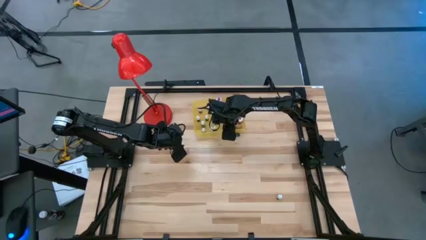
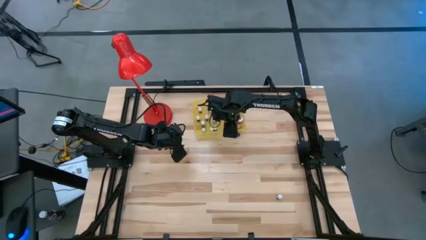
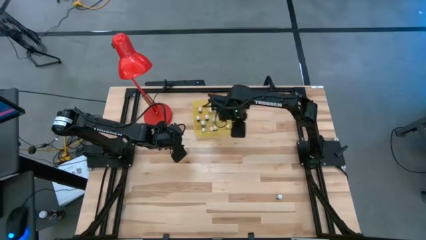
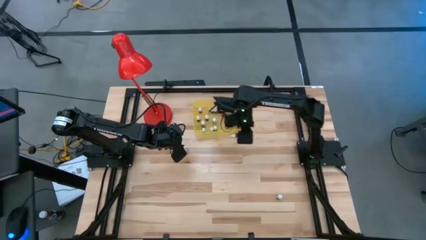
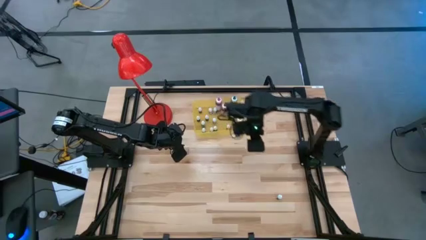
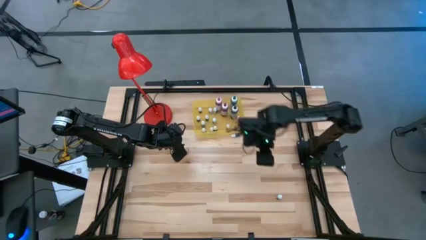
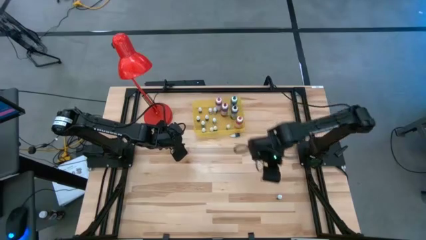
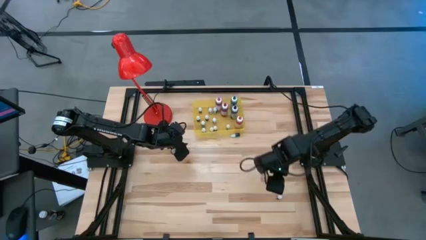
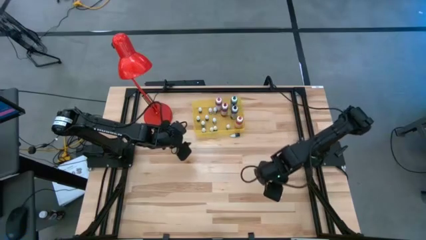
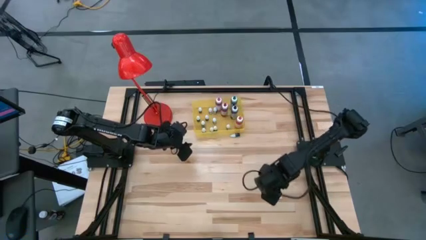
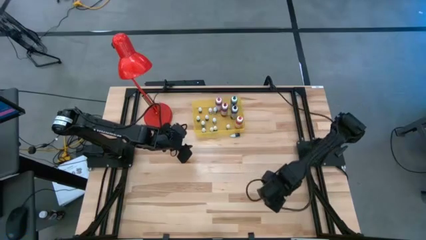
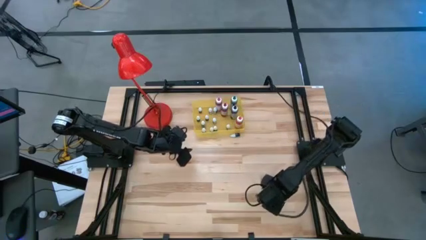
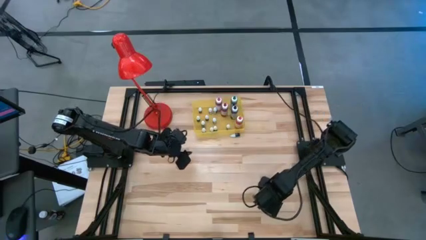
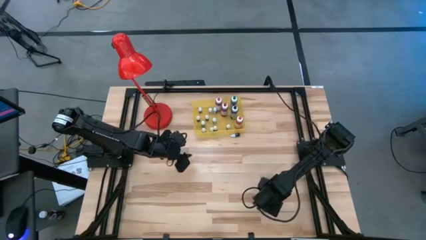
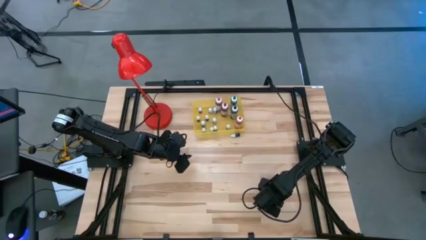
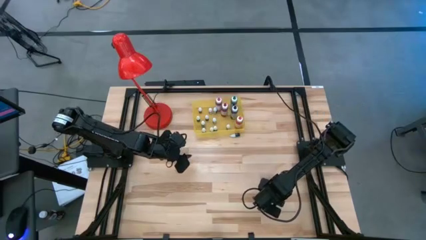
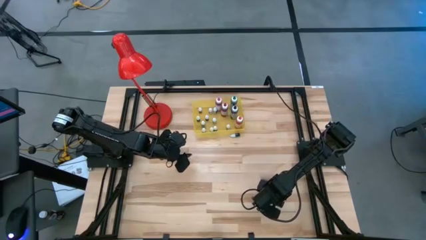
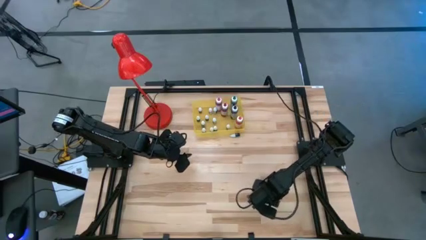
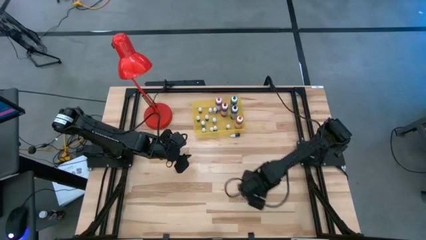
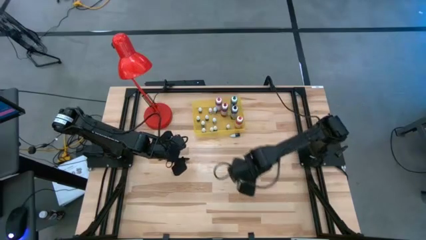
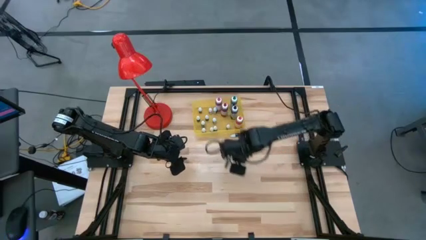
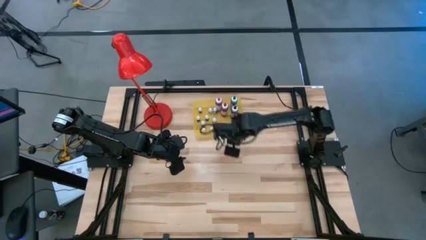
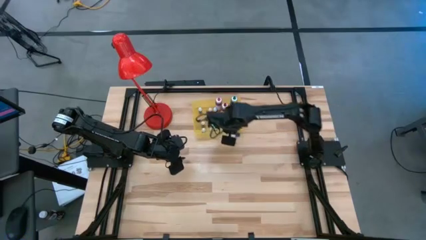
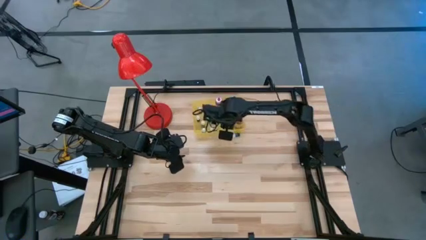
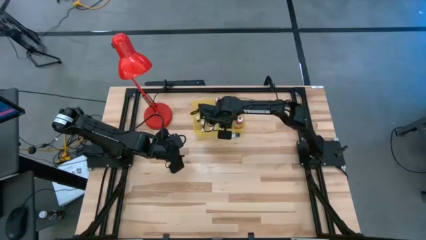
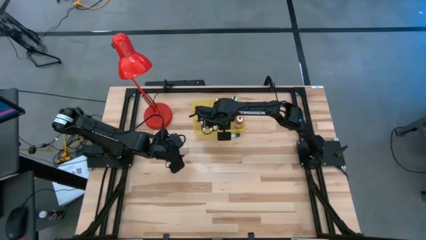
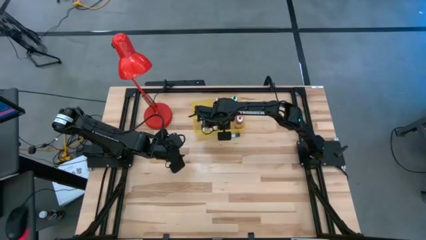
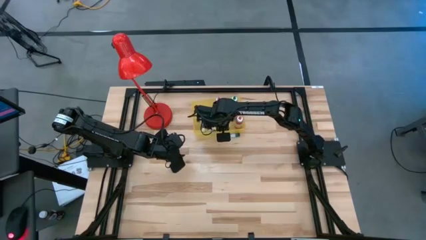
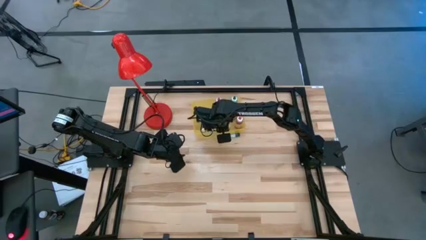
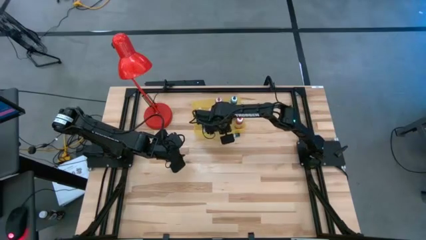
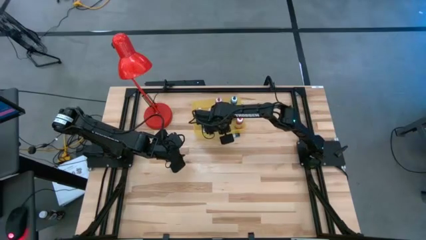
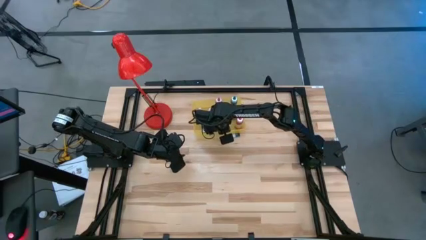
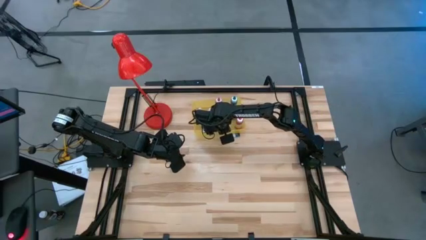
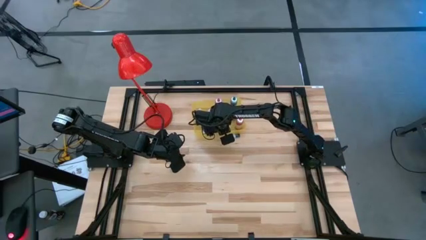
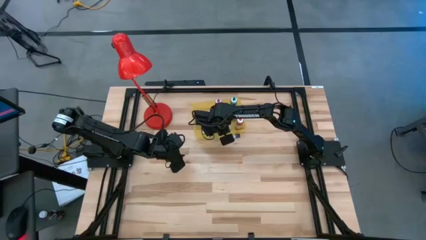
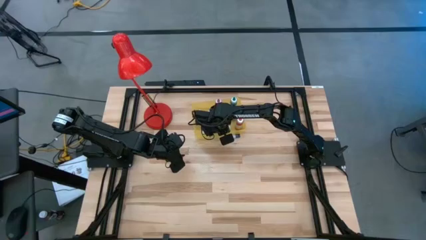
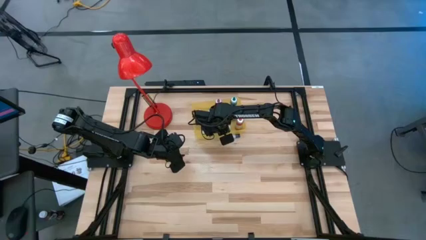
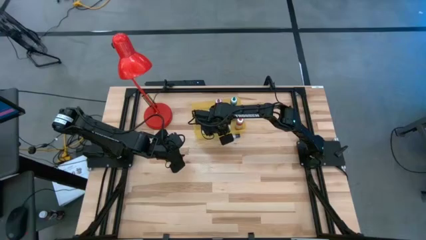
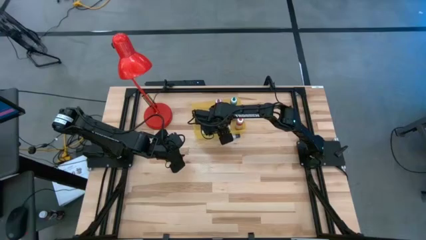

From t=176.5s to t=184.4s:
Task: Pick & Place food coloring
Put the small black food coloring bottle into the yellow bin

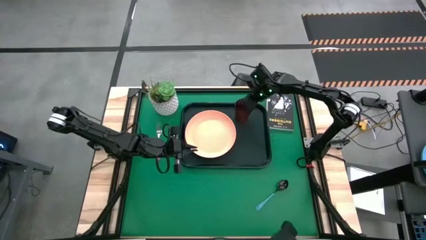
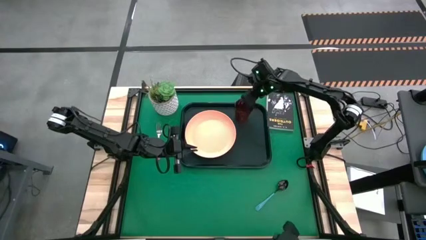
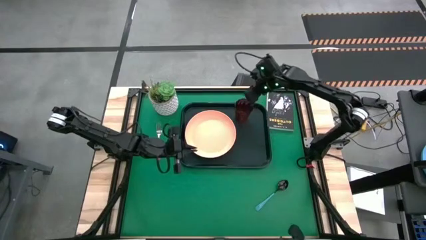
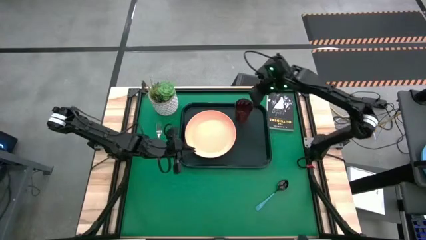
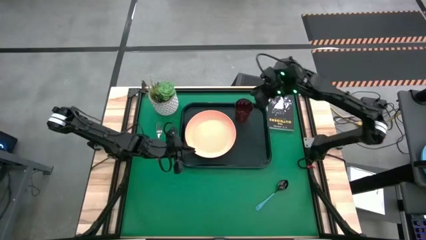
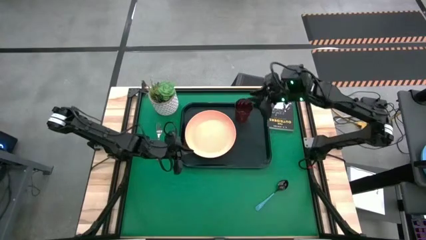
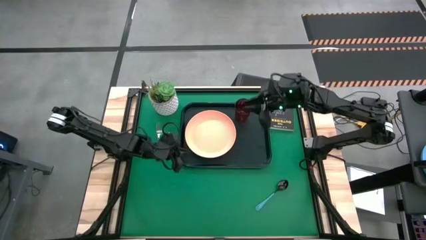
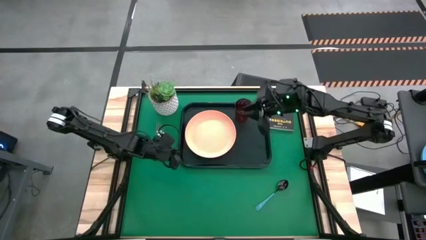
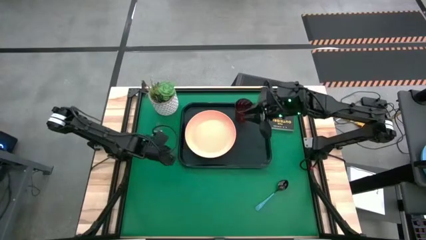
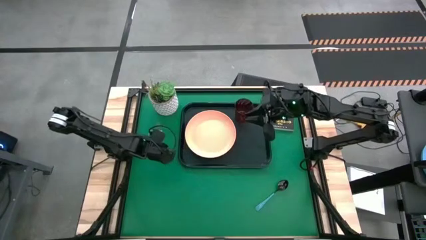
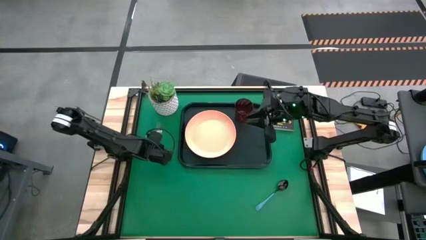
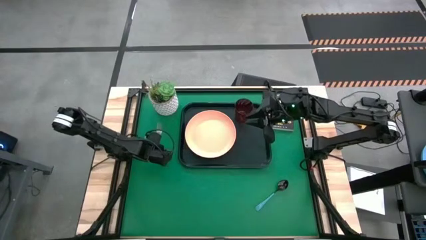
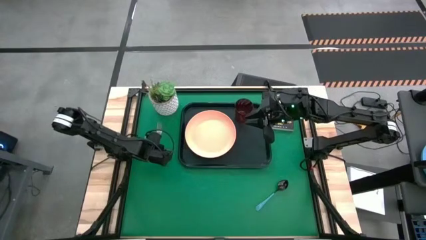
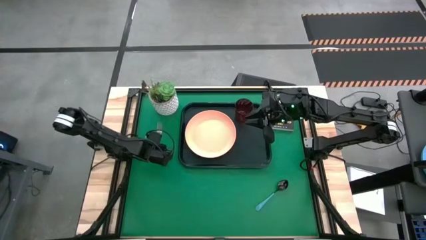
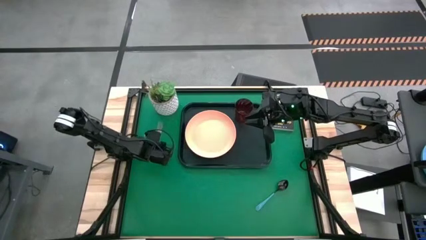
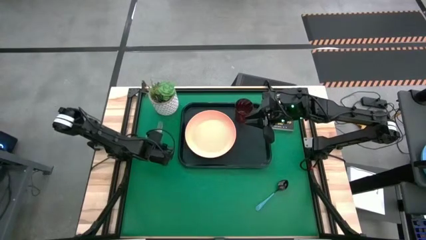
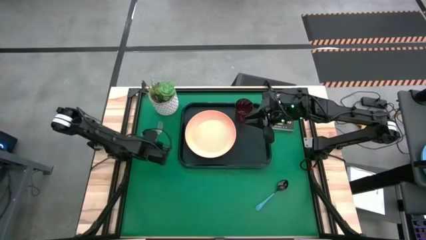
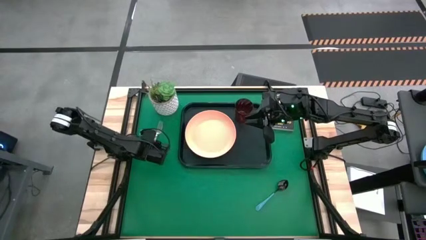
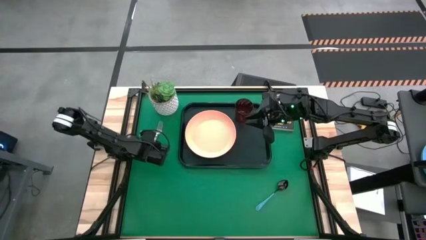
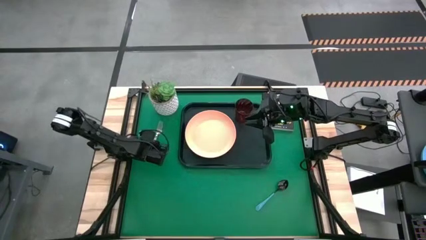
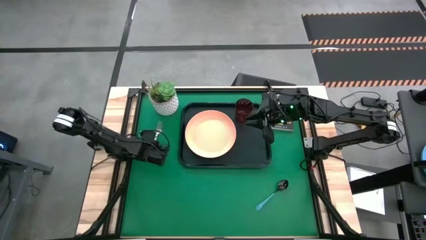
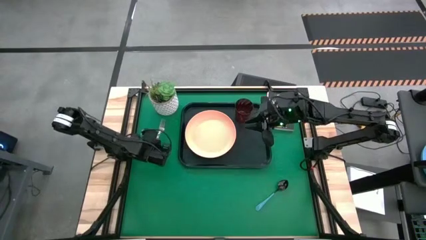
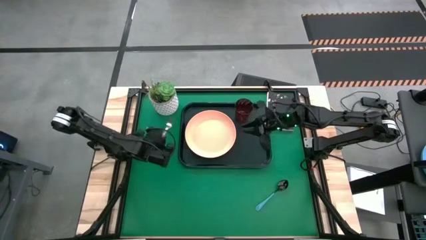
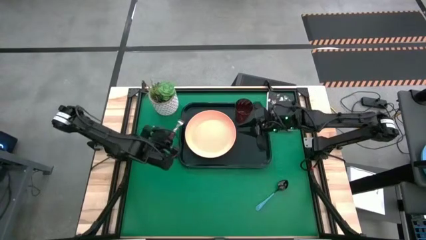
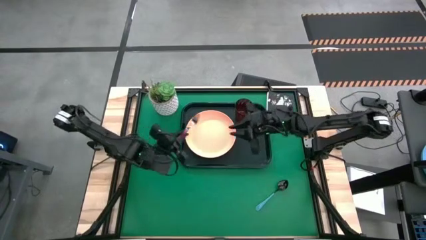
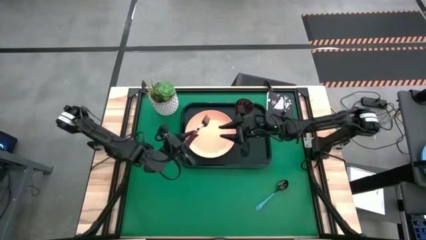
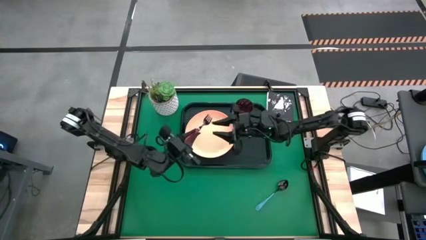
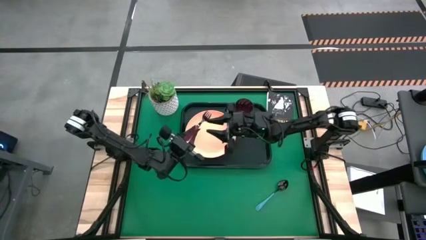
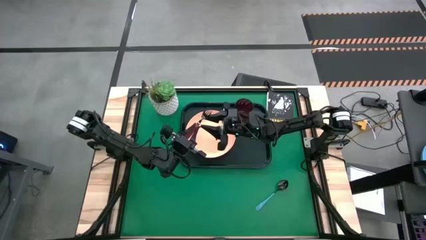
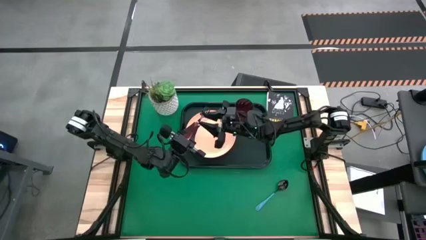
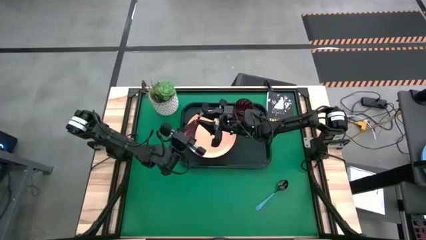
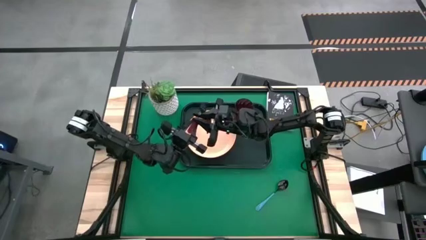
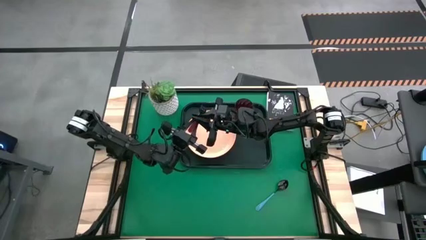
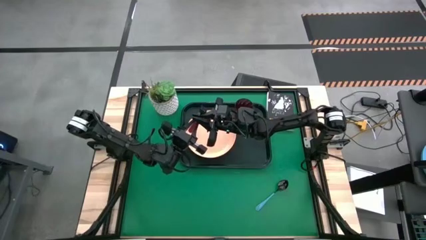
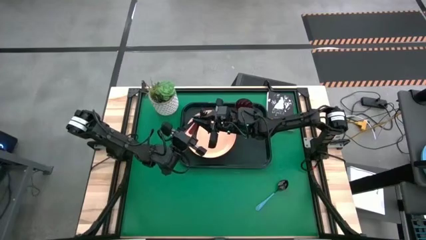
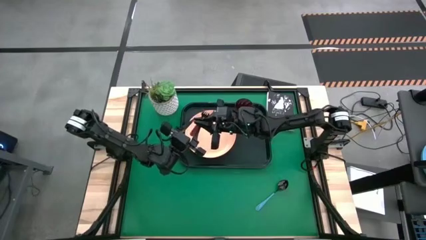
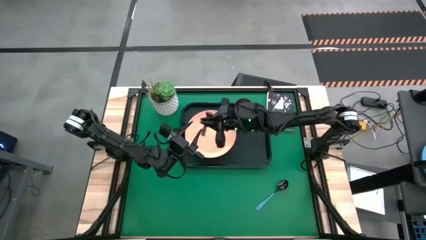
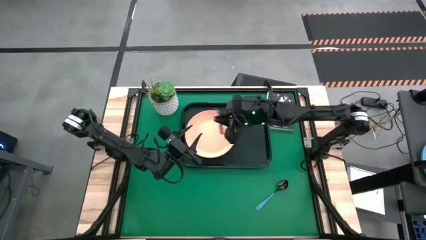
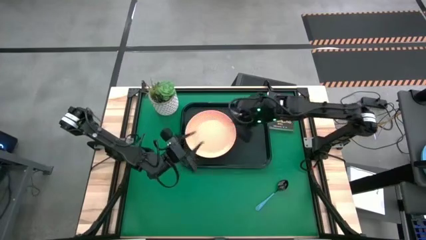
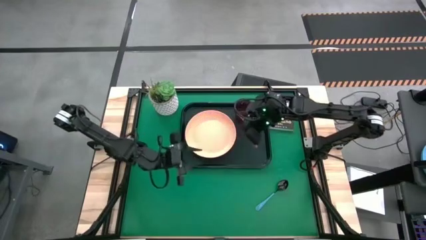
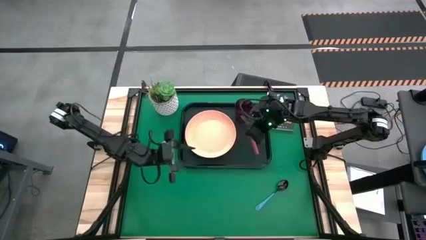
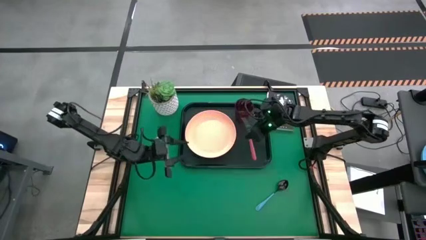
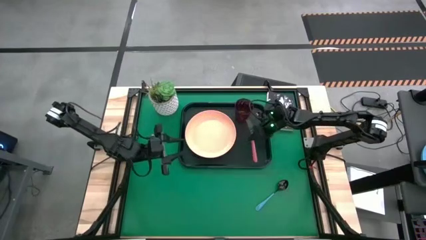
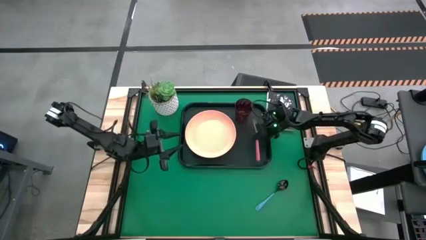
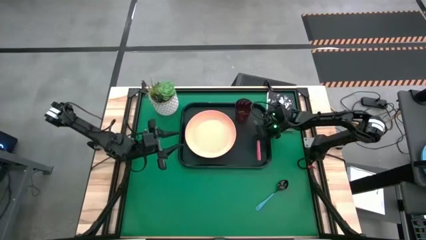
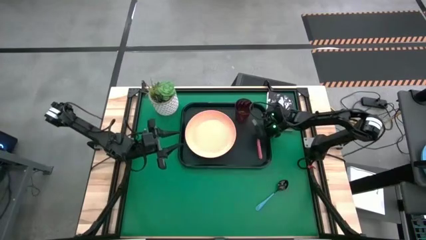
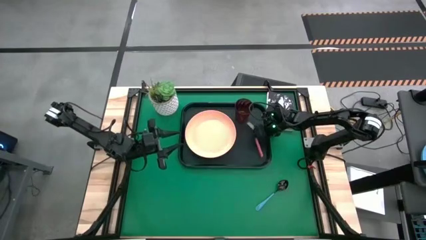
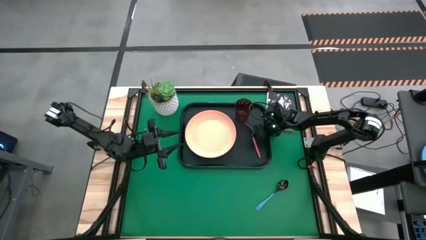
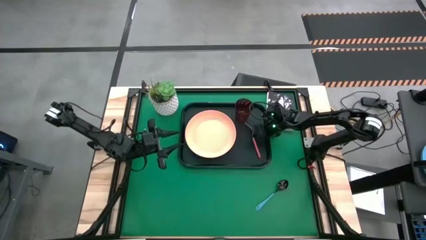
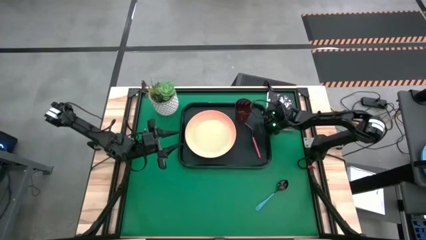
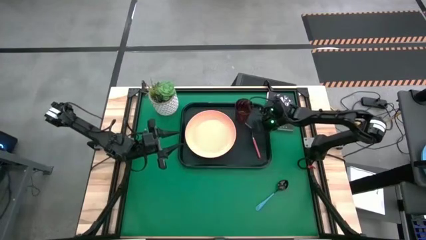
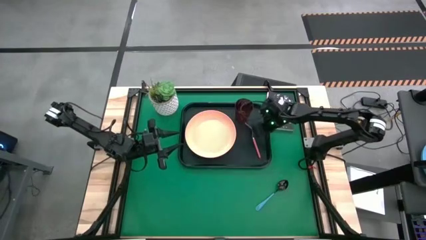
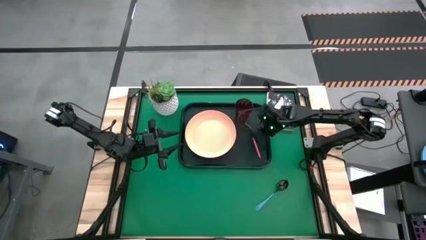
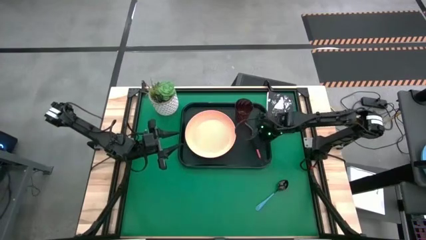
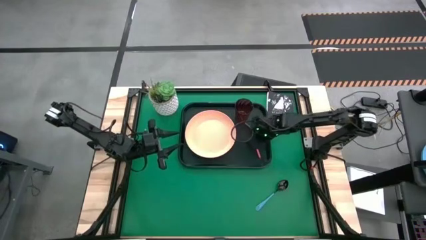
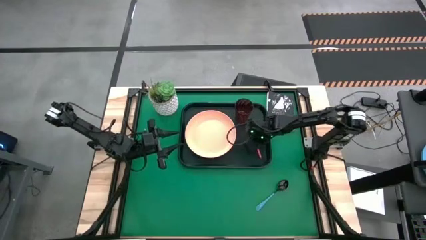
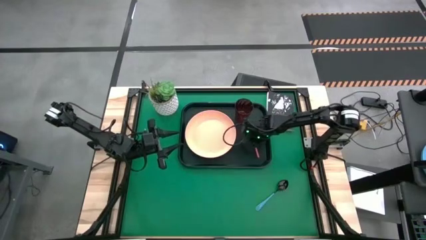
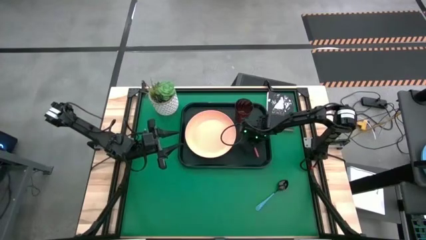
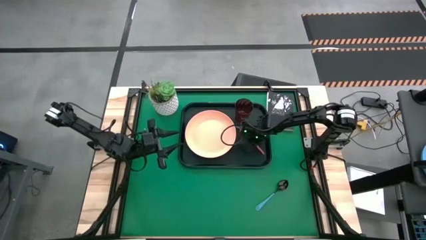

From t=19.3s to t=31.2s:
Task: Pick and place plate/cup/fork/spoon on tray
Put the pink fork on the dark green serving tray to the right of the orange plate
